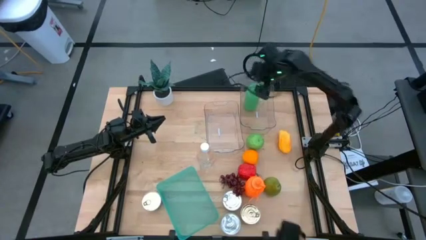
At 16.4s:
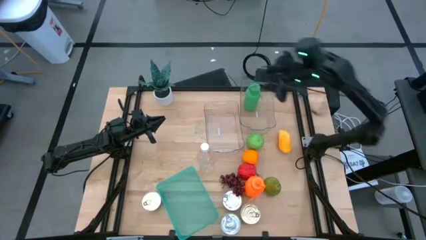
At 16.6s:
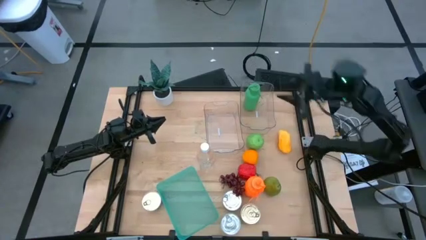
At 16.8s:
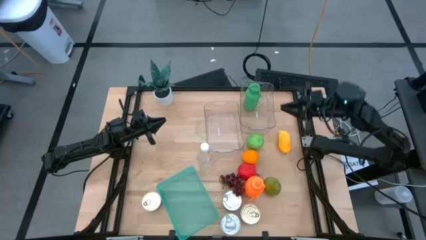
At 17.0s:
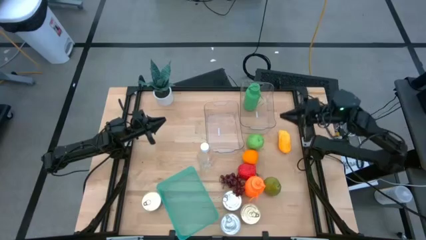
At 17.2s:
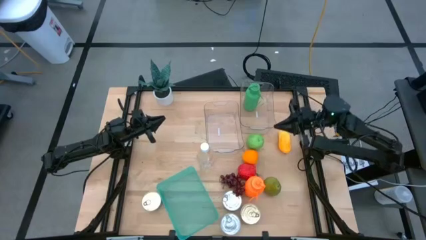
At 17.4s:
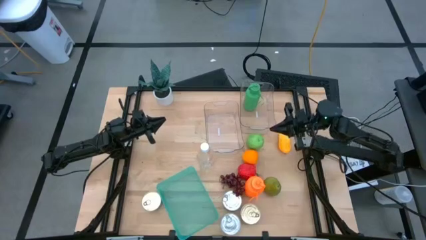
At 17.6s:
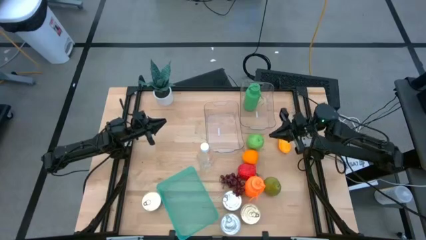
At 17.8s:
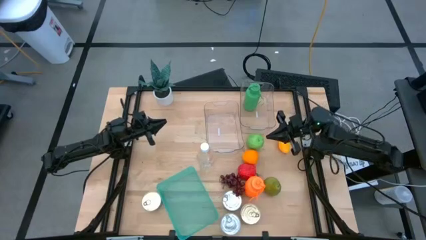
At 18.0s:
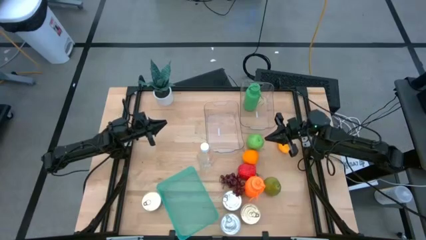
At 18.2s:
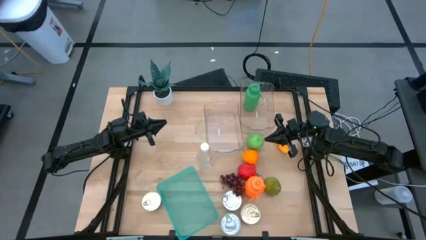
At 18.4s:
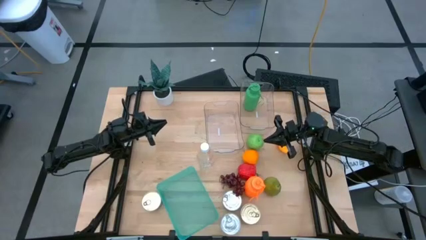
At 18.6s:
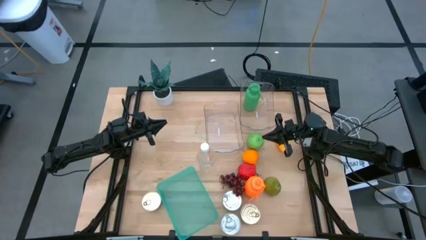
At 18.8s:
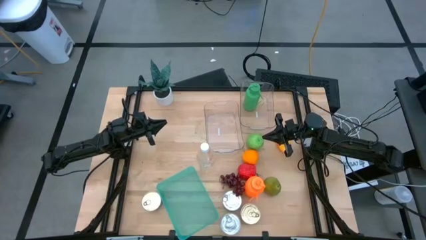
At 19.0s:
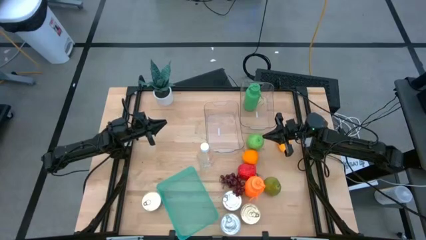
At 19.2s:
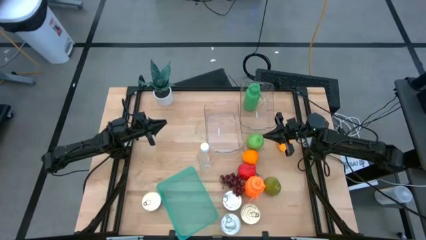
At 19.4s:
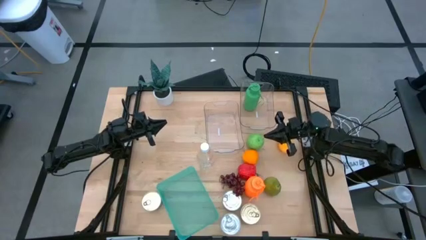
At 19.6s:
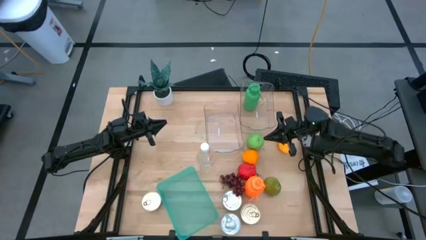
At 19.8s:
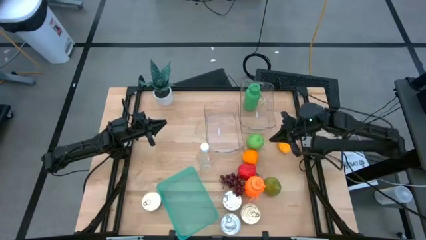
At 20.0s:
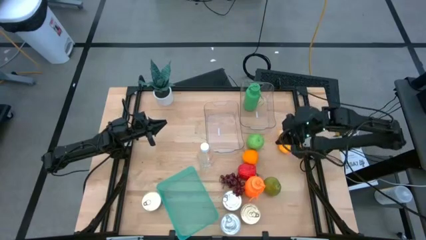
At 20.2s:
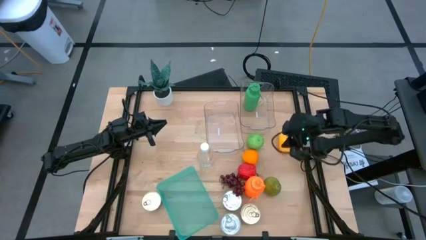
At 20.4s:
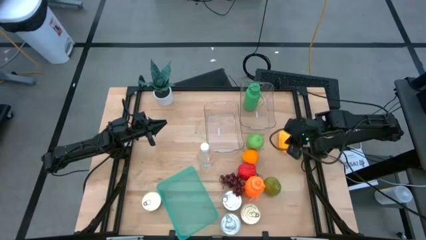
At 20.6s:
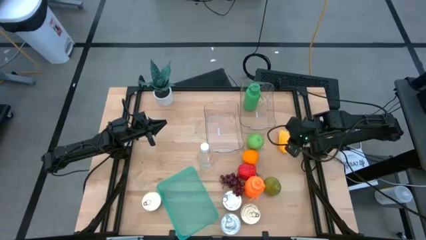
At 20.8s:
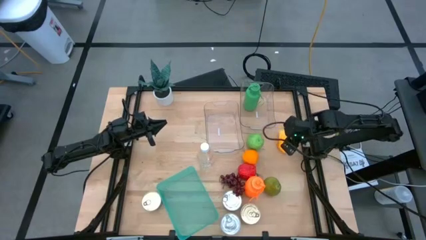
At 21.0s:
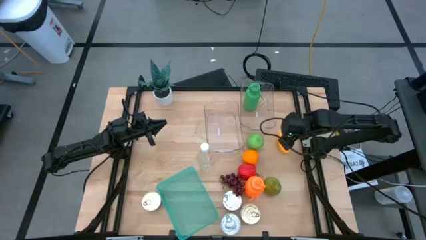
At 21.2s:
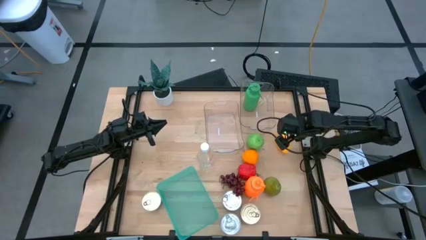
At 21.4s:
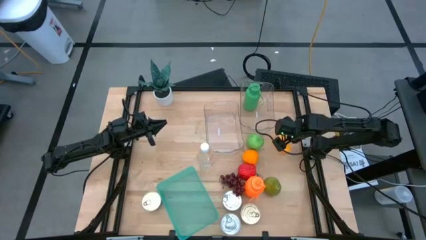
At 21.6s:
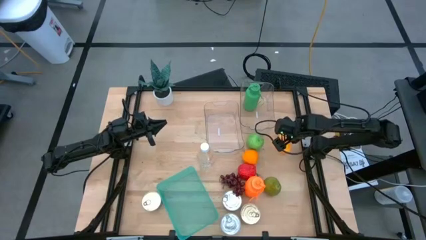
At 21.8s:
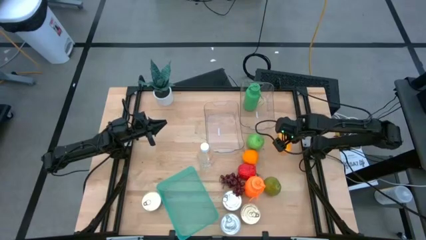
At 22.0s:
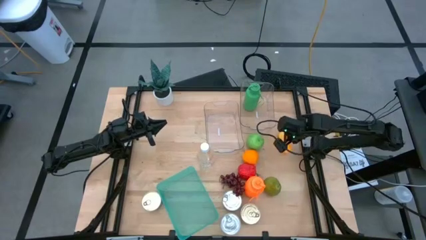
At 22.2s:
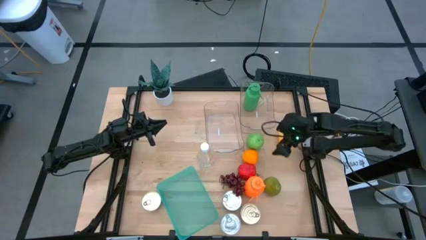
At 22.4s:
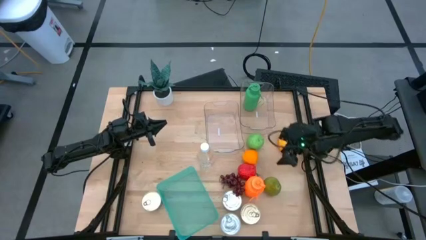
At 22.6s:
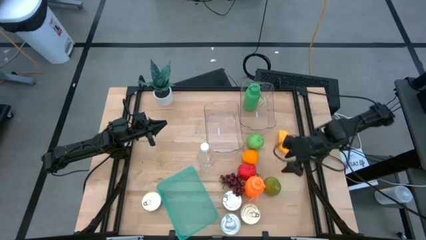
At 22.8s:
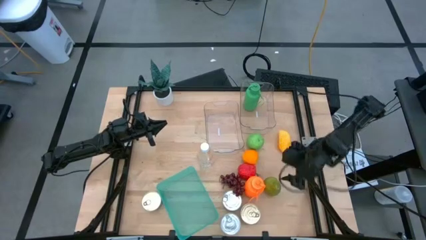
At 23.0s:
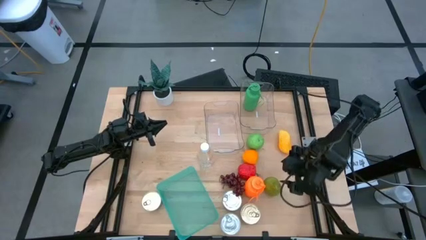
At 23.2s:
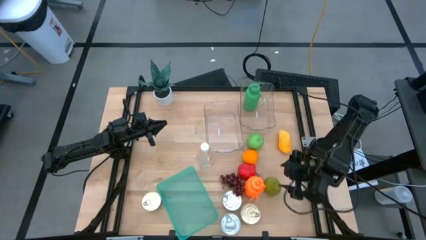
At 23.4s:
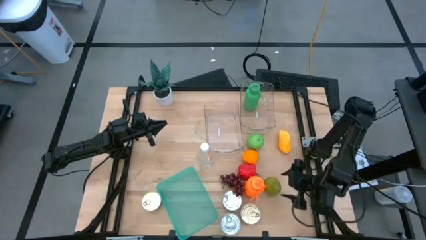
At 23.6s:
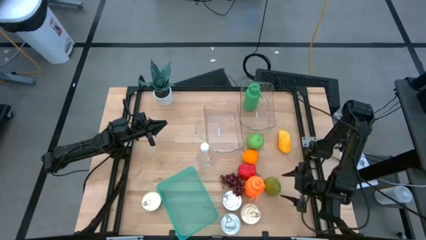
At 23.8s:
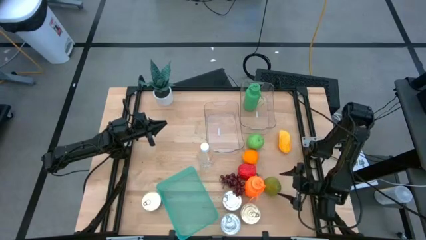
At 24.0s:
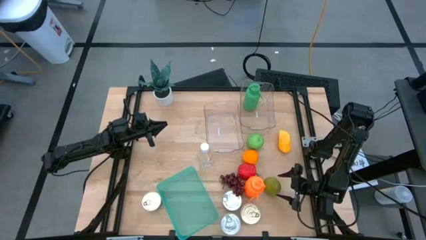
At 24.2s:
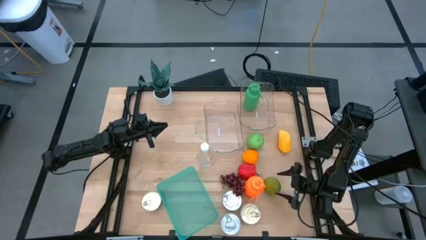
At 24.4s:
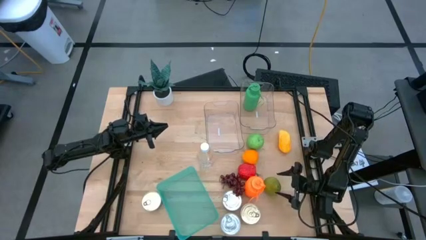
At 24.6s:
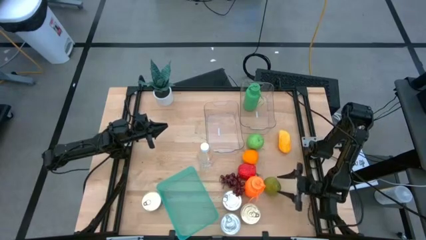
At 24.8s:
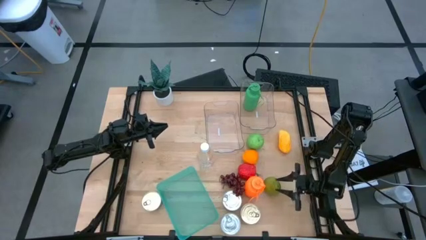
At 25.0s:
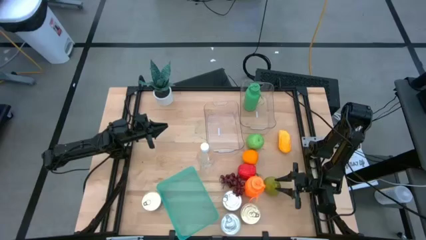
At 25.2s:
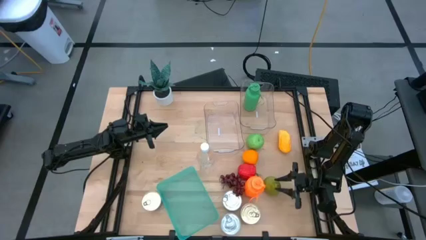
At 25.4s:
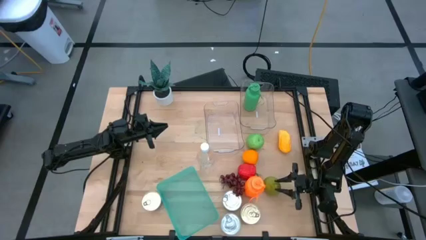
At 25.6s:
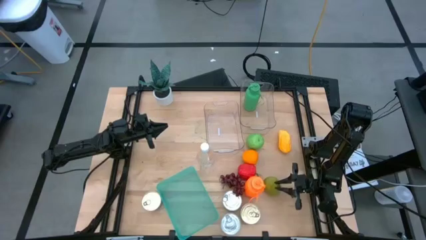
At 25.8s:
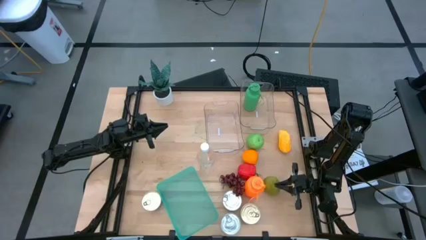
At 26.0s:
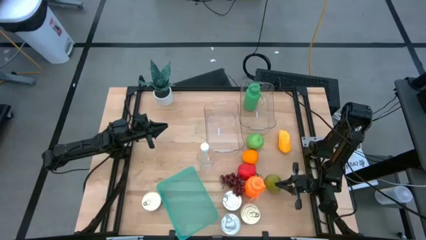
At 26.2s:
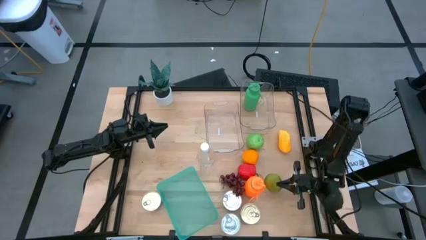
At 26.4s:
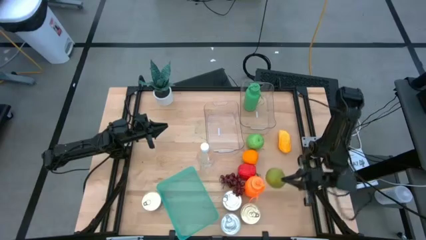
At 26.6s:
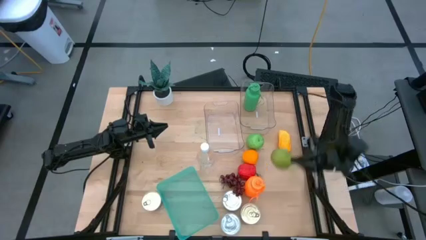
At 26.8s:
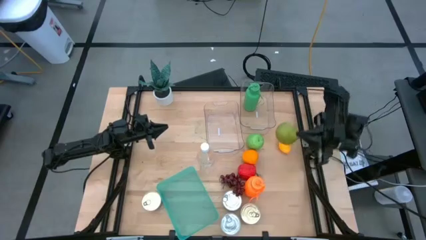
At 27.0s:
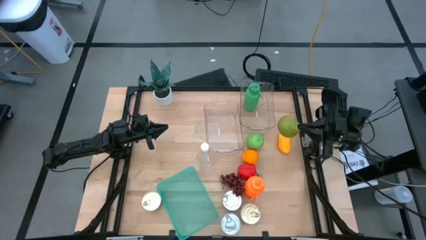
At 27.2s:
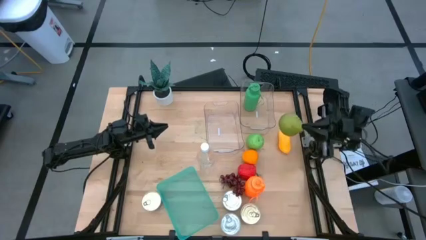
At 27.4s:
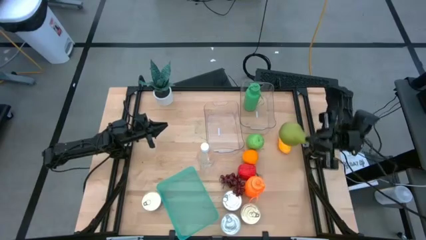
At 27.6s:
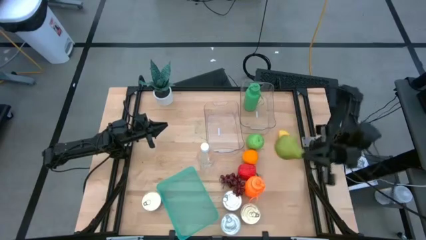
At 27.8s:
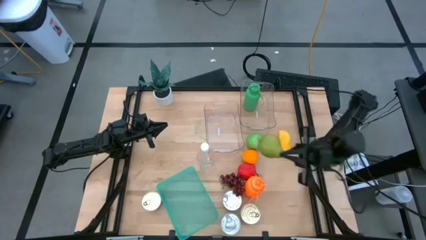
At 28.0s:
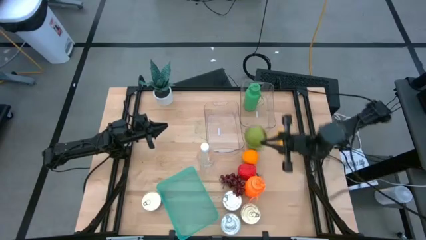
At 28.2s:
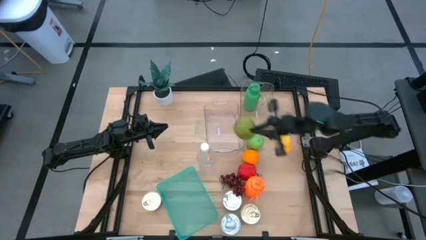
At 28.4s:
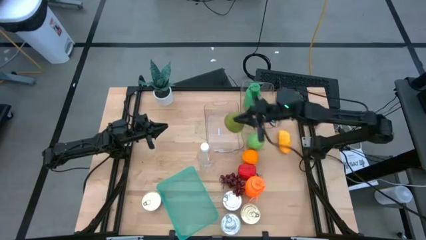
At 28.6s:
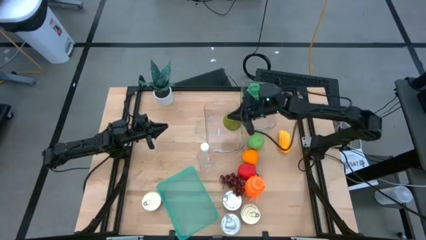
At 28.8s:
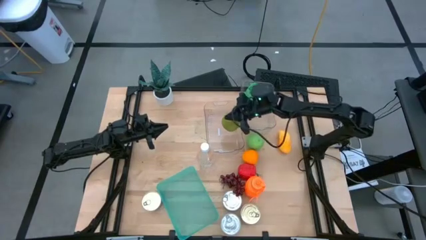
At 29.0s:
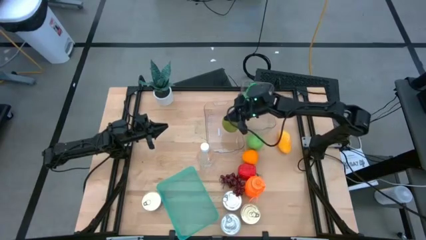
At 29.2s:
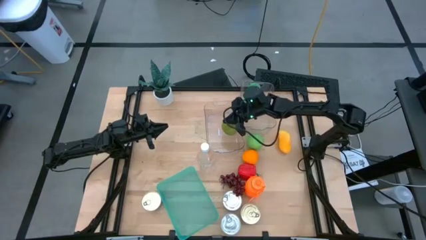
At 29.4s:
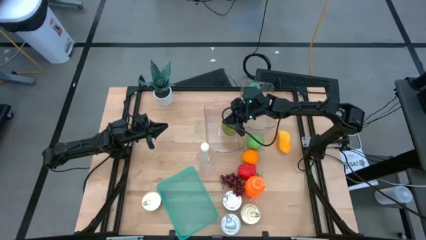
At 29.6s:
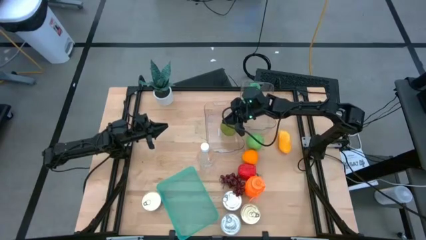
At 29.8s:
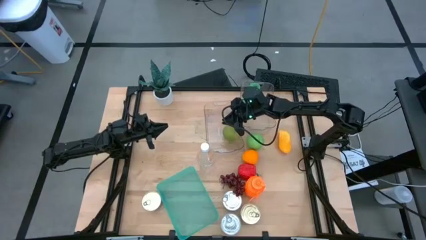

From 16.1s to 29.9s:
Task: Pick & Place Food Item
Put the green pear into the bottom transparent bin
